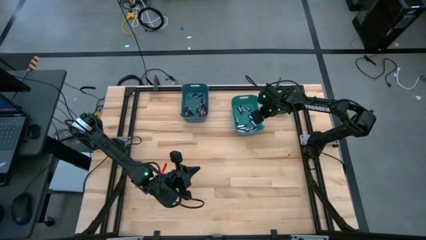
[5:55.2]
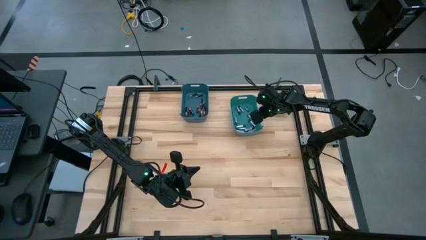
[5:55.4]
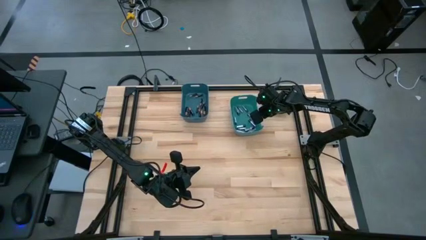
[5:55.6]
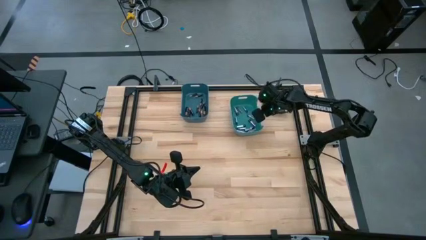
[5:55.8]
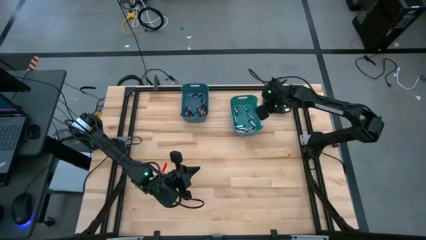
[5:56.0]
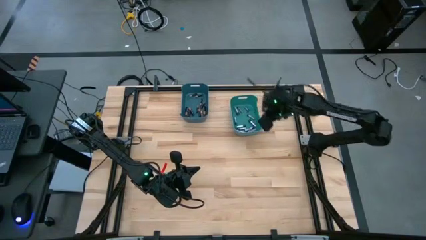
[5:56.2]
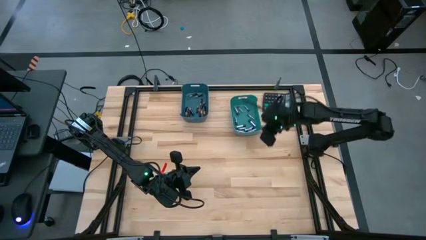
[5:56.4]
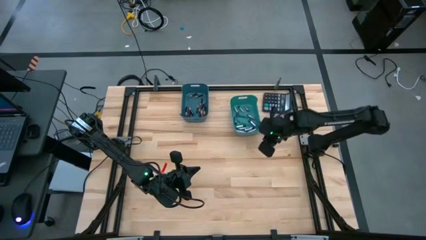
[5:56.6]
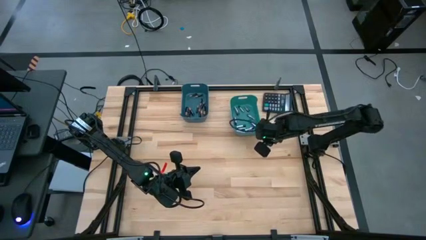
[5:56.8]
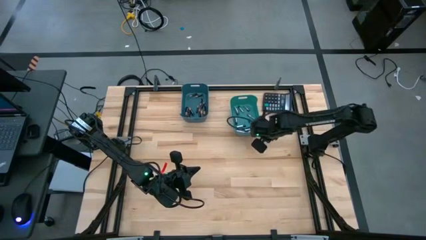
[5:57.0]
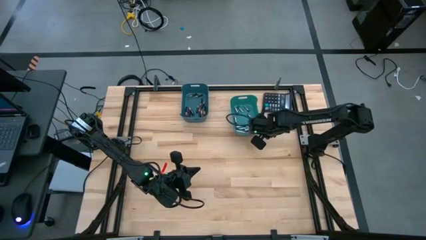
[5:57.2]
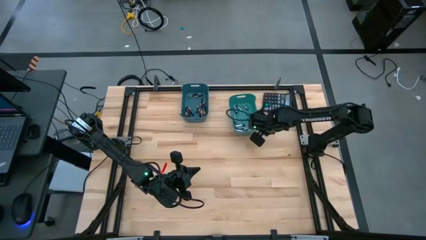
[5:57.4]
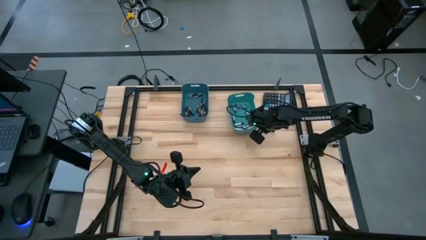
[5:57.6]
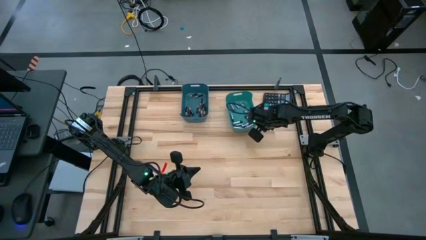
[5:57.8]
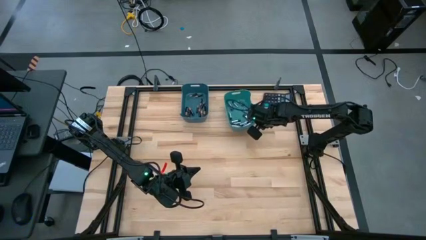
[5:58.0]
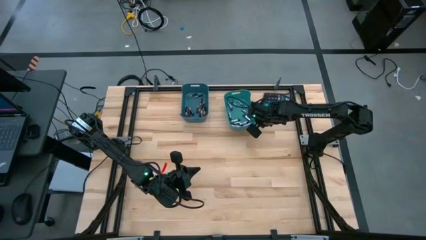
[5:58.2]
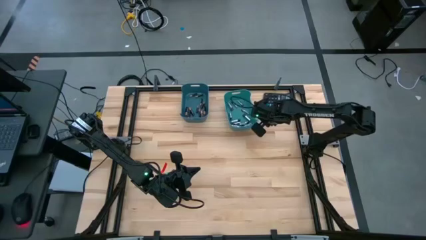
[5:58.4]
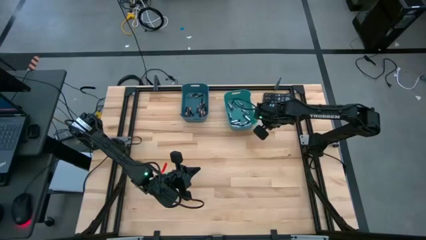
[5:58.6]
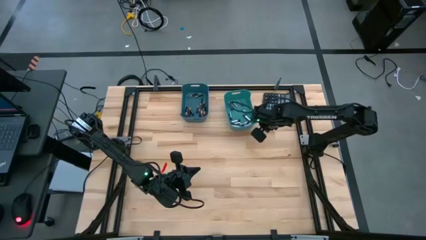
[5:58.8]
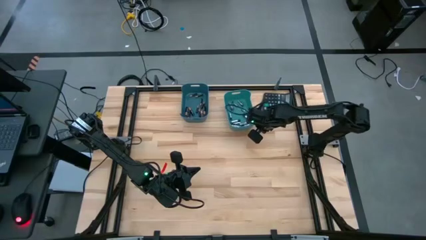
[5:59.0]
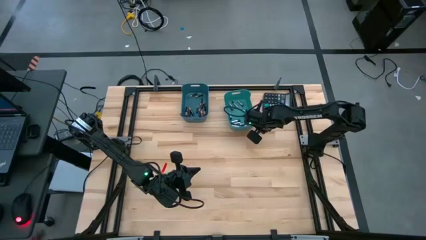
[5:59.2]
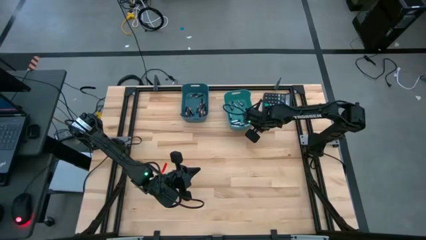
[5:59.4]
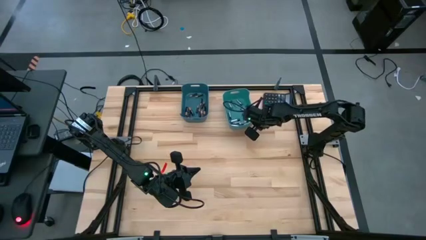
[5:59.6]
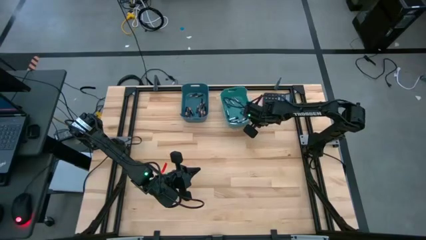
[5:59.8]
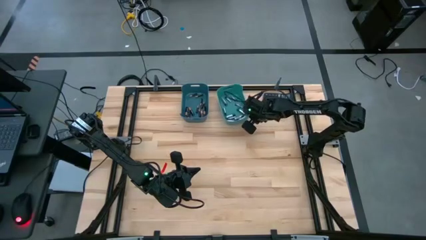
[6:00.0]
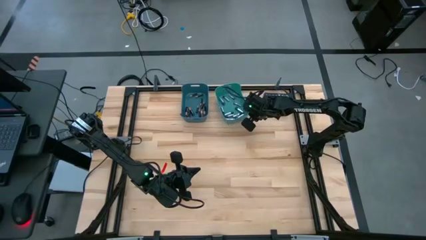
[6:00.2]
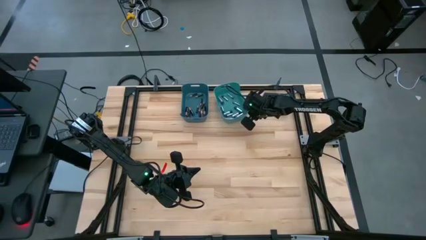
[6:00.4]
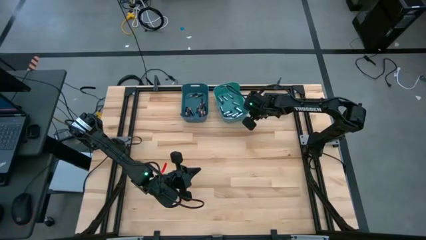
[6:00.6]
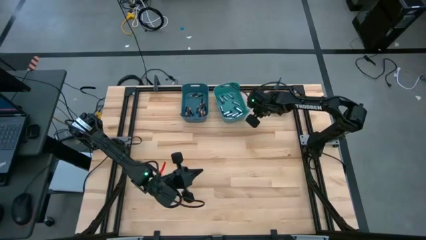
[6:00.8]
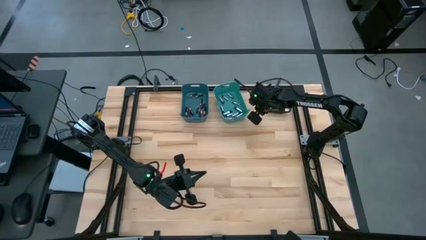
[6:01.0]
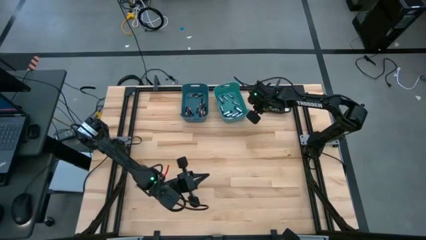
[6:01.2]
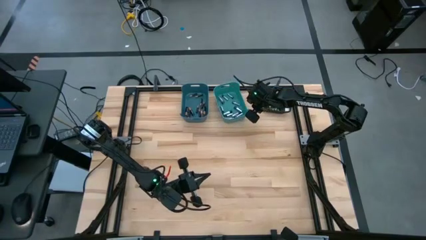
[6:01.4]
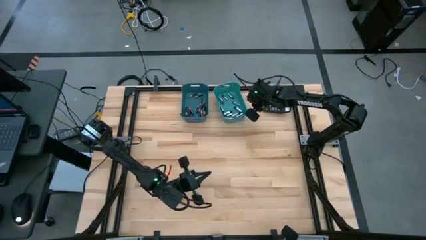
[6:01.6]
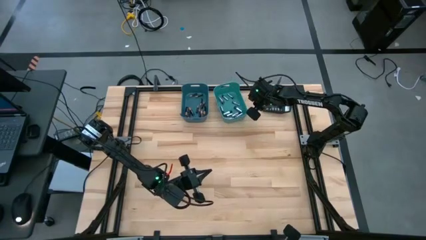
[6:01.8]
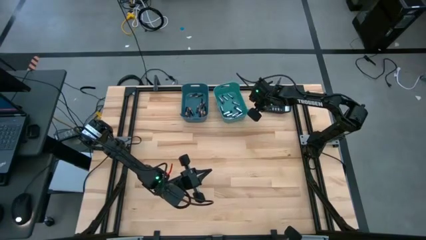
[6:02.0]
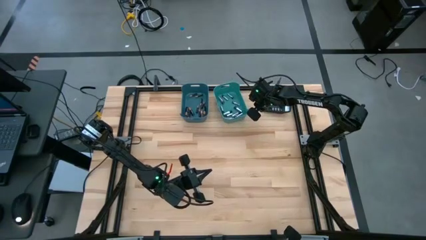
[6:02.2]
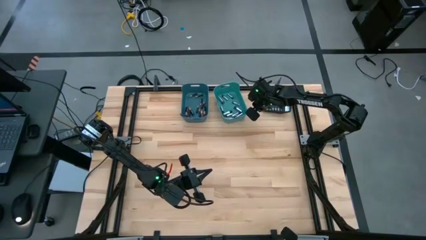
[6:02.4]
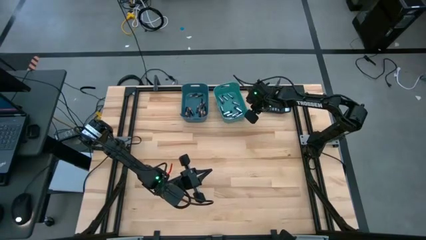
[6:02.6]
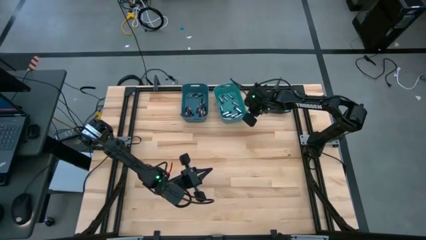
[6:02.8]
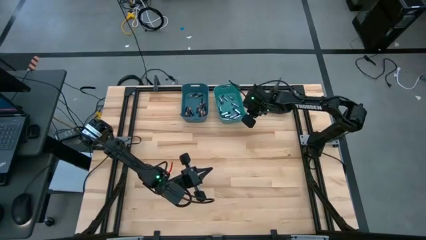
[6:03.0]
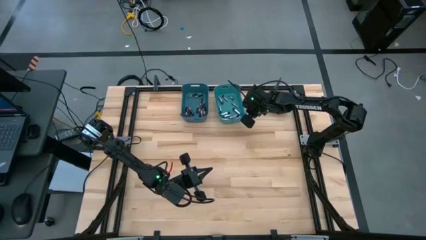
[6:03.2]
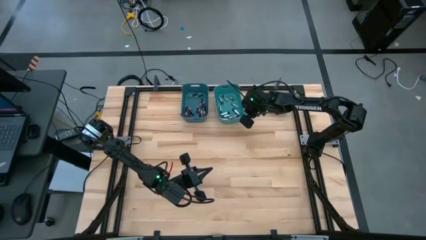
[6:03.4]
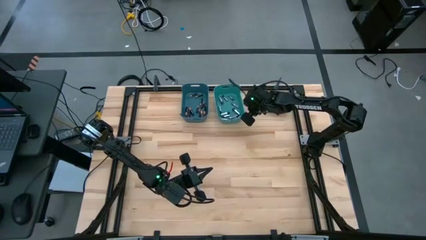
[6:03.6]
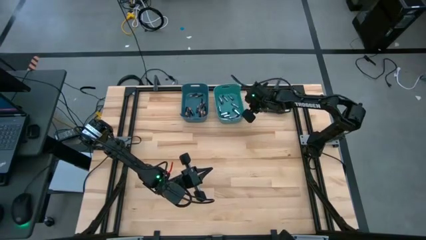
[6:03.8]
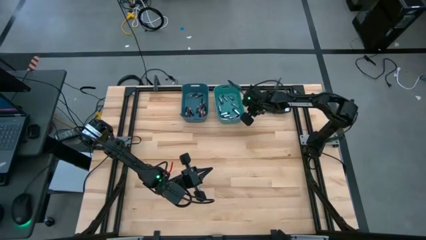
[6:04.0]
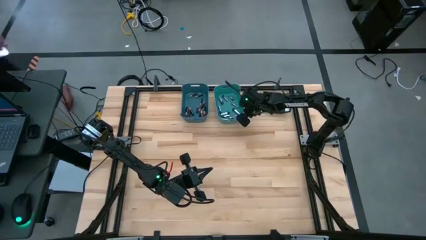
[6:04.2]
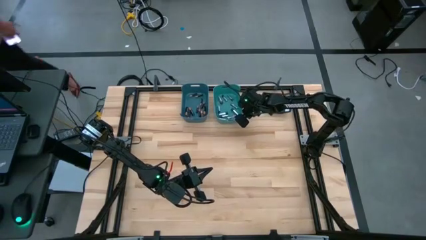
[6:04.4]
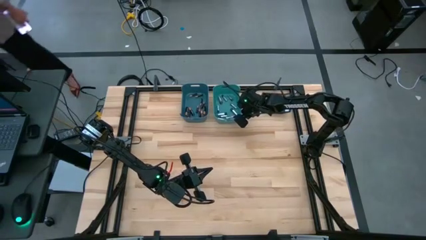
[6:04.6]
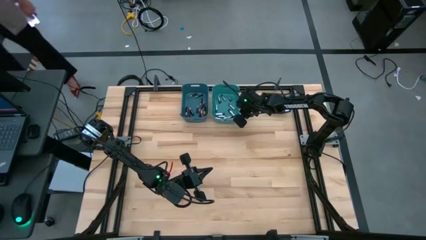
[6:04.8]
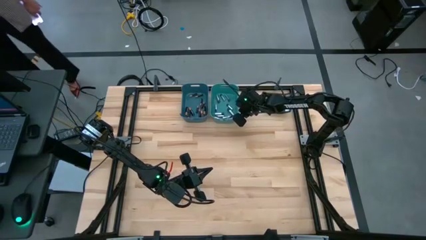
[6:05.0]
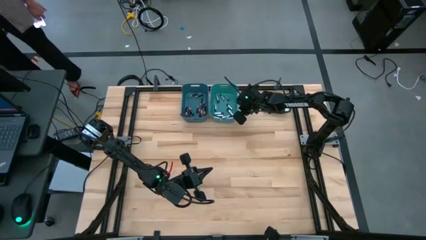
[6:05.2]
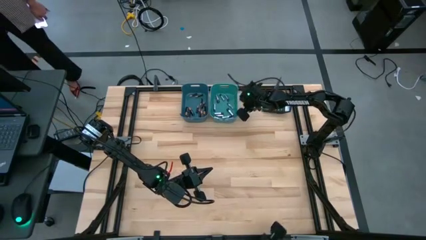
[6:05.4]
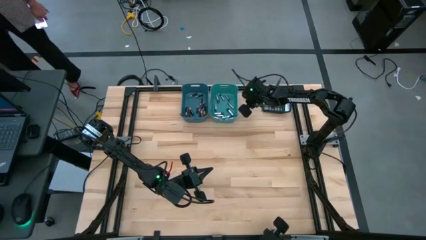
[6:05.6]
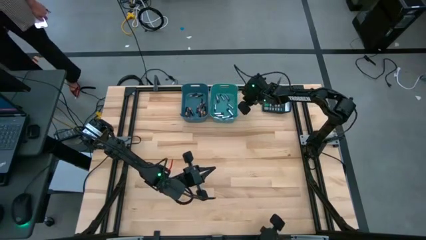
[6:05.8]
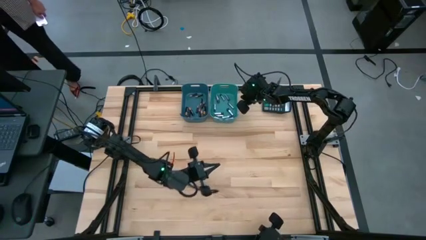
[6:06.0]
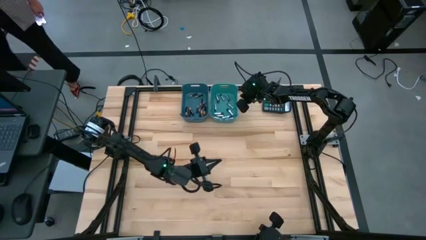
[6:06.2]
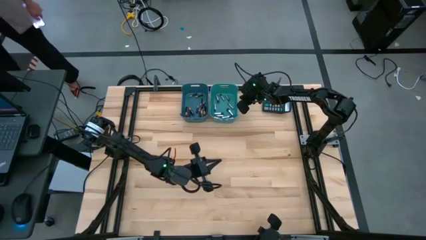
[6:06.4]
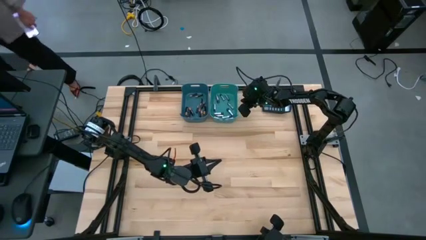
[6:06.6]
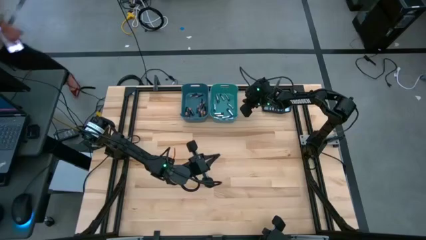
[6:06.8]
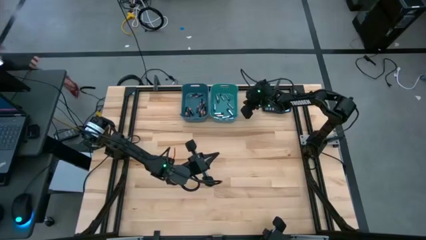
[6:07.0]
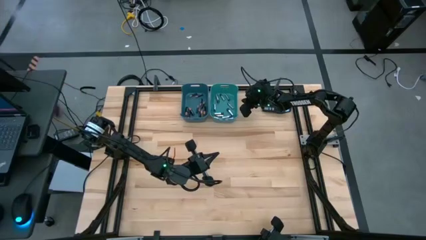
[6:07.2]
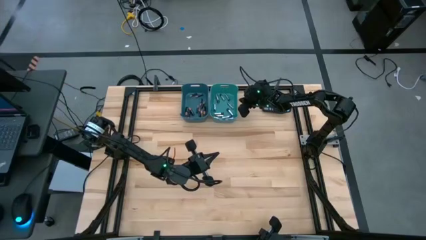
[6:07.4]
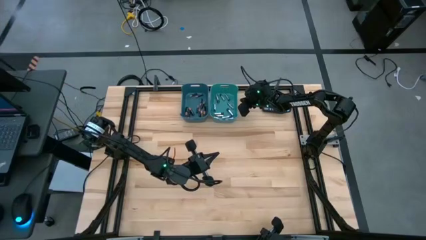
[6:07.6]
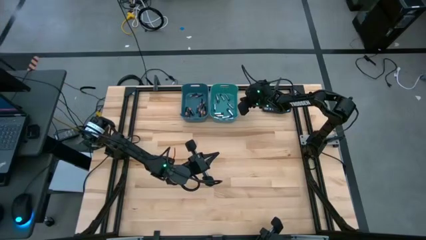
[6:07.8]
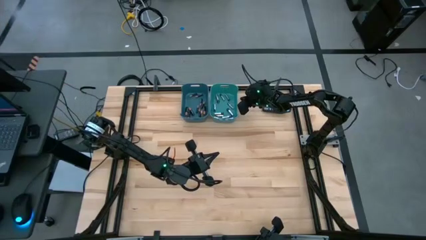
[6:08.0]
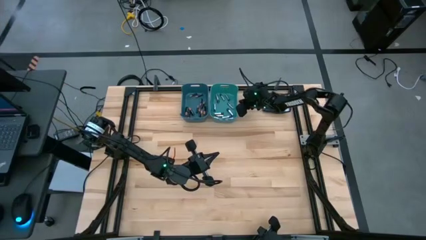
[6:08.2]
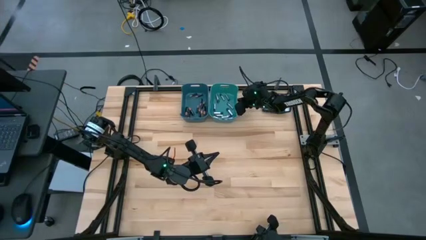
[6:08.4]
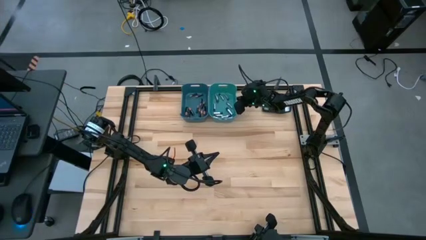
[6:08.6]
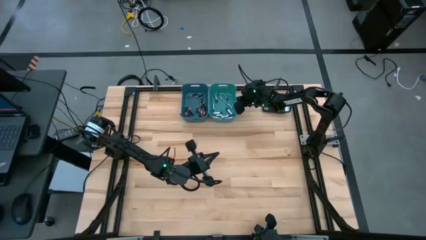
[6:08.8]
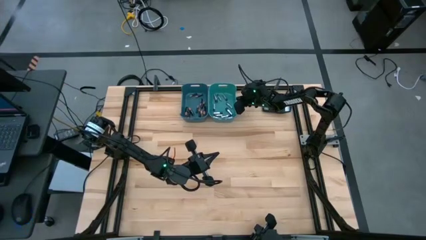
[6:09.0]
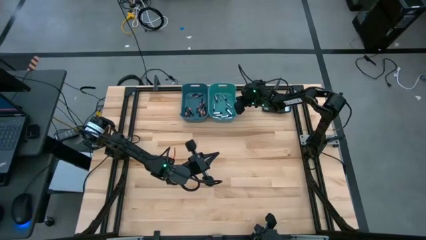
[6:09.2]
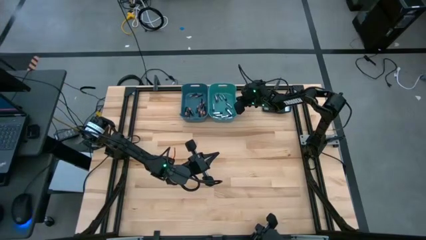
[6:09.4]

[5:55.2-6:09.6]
Task: Sort batteries
Move all the bins to the top corner of the table

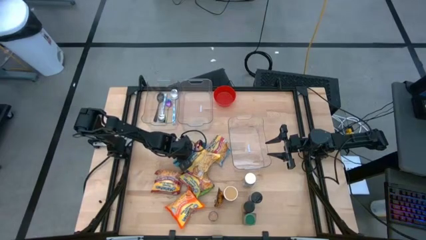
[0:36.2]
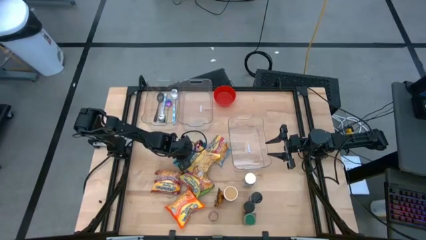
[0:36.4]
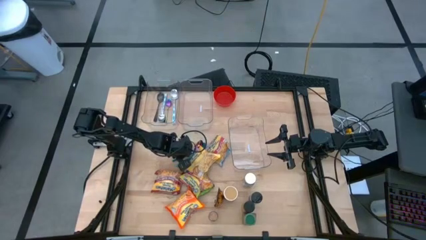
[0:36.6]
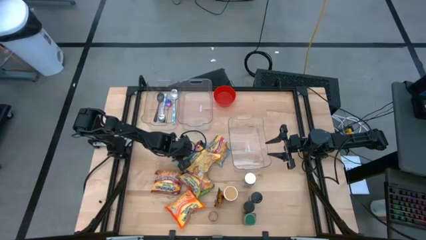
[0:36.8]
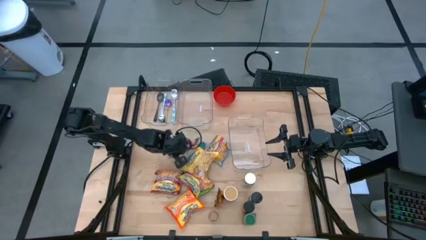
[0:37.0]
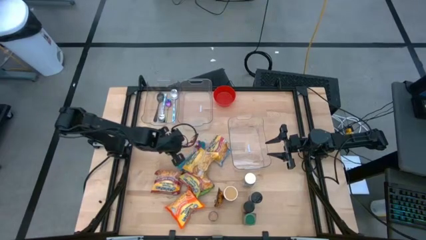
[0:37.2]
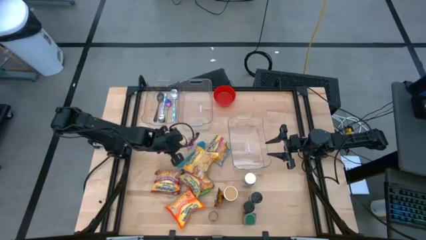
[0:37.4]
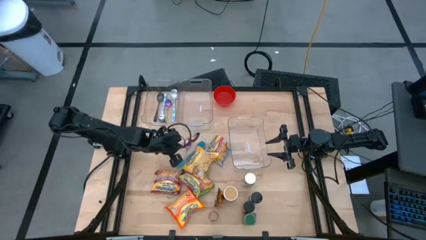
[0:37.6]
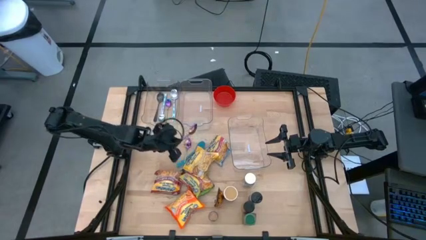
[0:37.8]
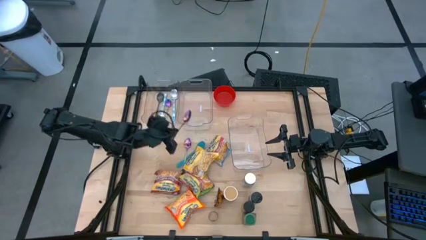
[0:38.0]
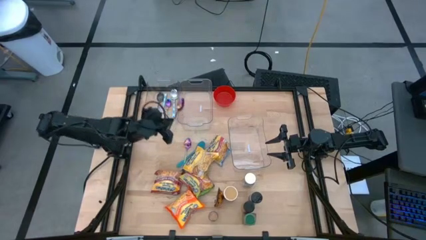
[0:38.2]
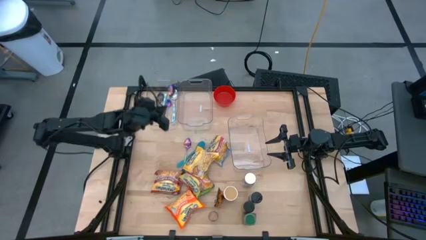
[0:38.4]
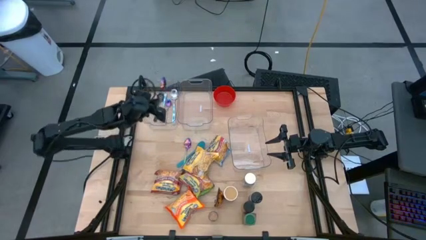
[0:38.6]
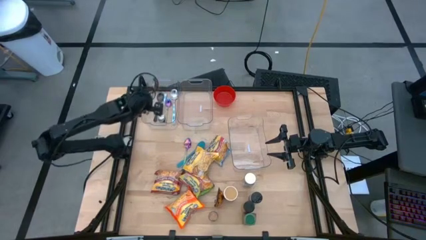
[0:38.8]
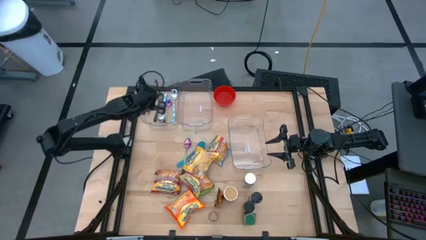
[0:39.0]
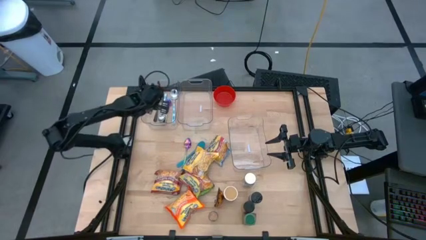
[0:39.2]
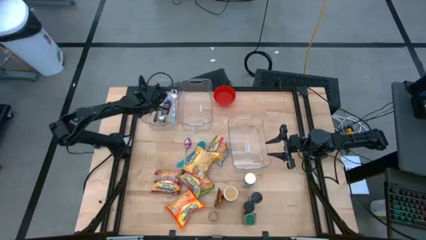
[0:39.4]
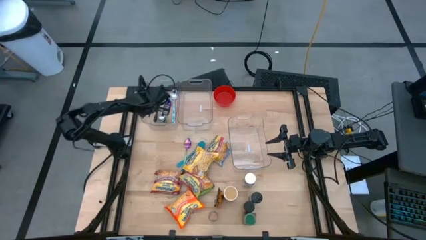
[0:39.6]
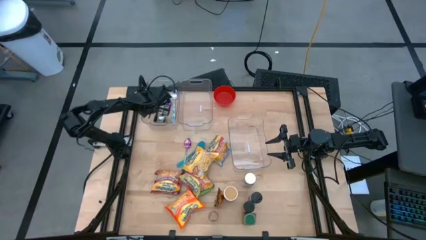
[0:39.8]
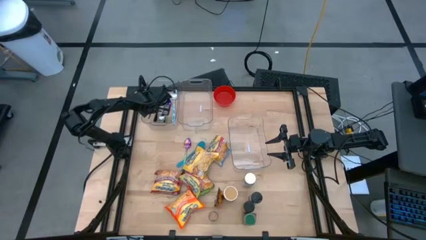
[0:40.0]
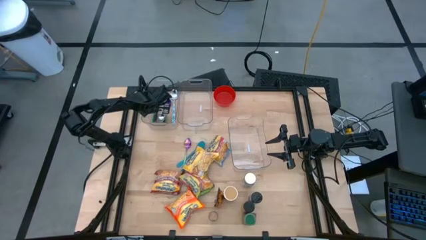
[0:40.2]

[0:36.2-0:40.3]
Task: Pick & Place Food Item
Put the left violet spoon into the top left transparent bin
